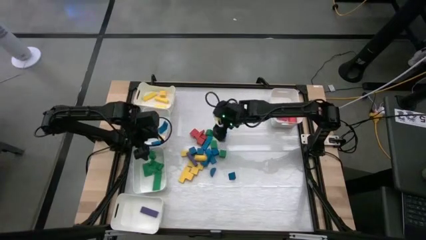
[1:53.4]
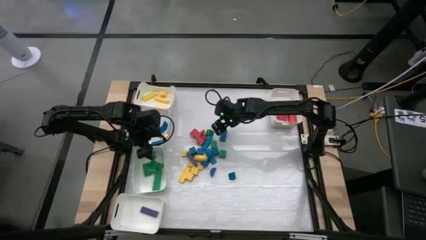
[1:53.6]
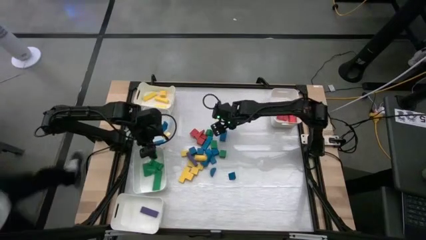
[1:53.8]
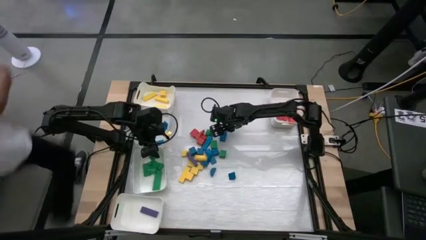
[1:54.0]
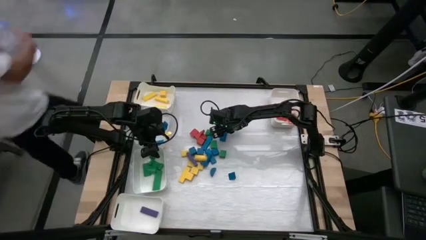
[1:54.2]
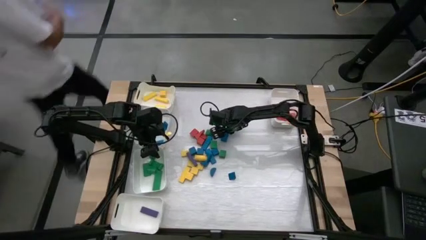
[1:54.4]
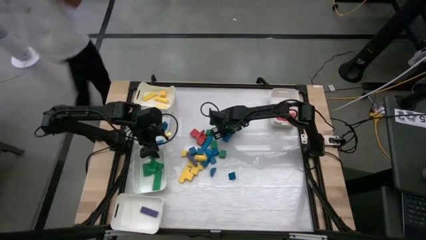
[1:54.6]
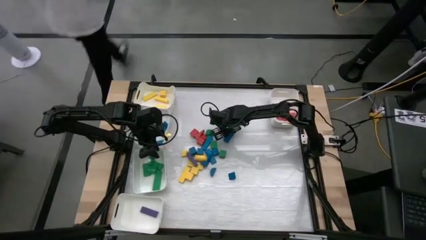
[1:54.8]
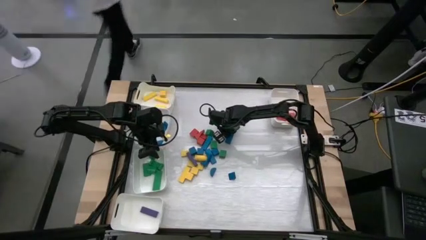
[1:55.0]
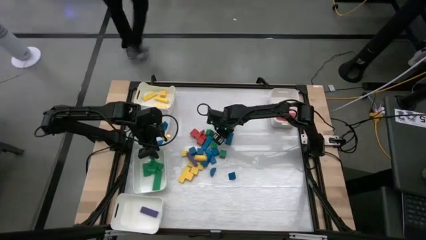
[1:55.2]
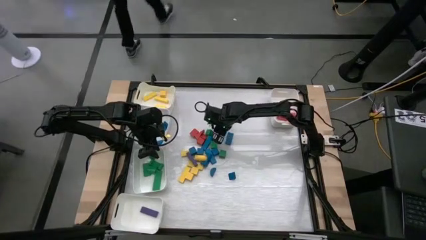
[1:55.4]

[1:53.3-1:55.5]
Task: Sort blocks
Put the blue wooden block into the top middle left white bin

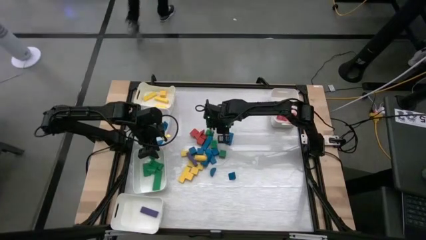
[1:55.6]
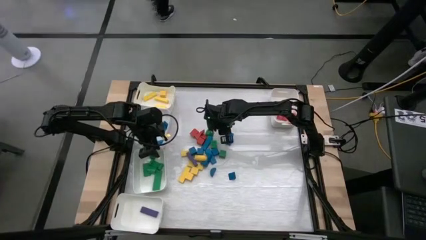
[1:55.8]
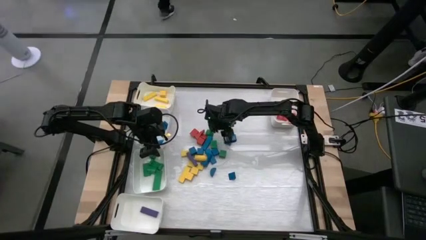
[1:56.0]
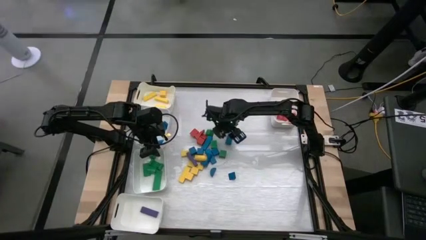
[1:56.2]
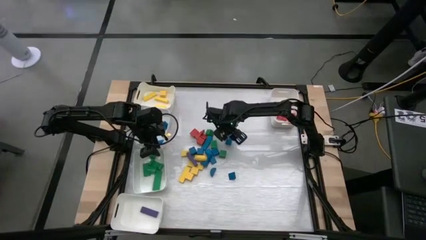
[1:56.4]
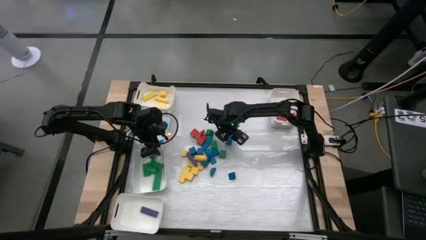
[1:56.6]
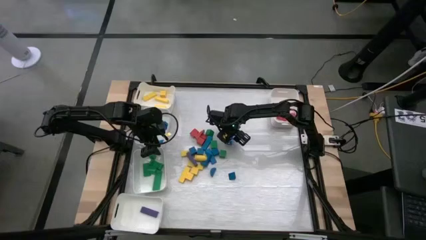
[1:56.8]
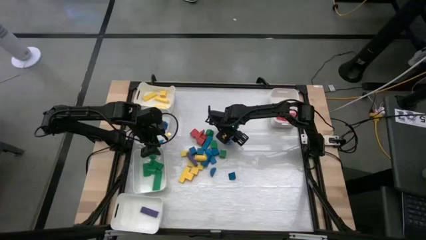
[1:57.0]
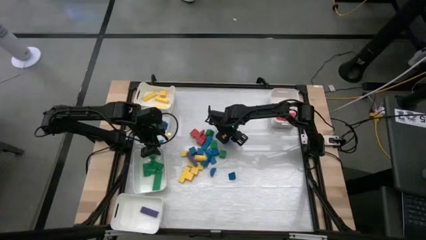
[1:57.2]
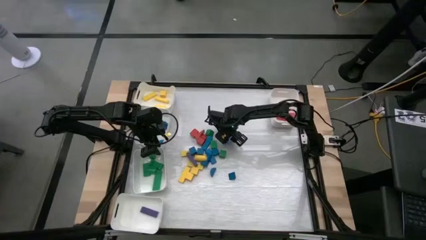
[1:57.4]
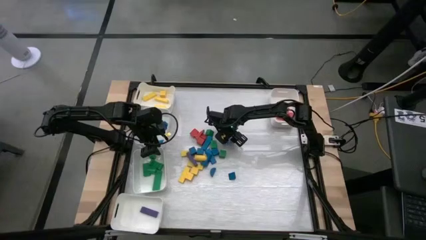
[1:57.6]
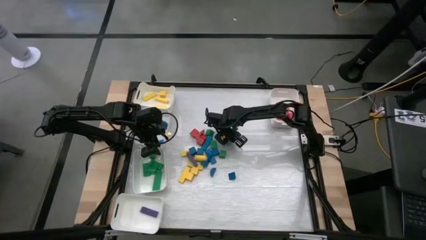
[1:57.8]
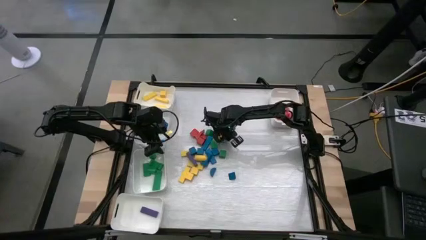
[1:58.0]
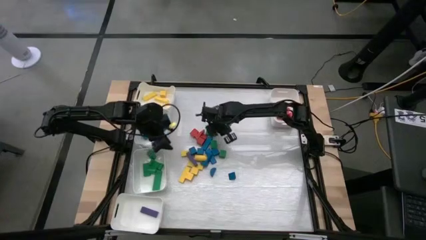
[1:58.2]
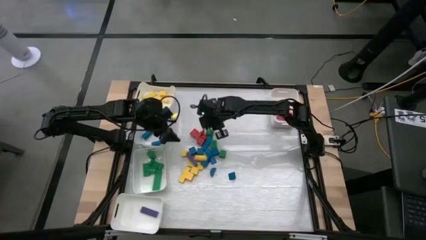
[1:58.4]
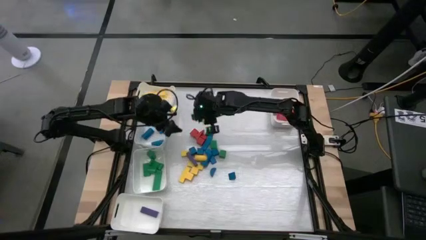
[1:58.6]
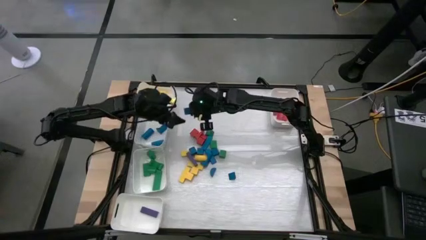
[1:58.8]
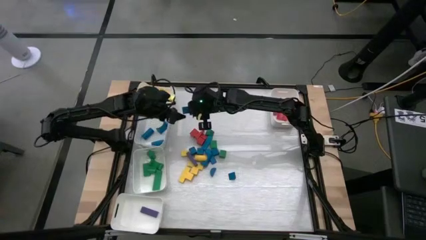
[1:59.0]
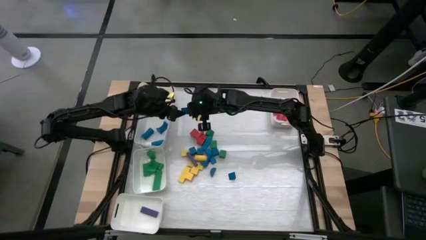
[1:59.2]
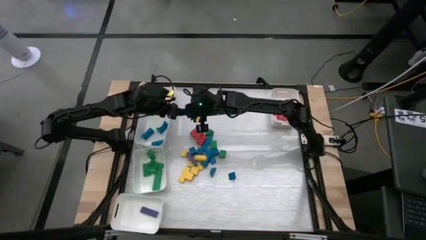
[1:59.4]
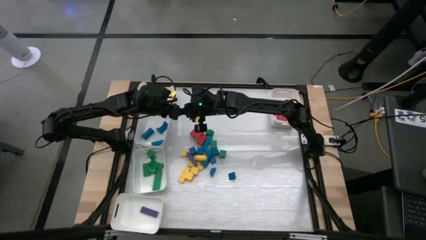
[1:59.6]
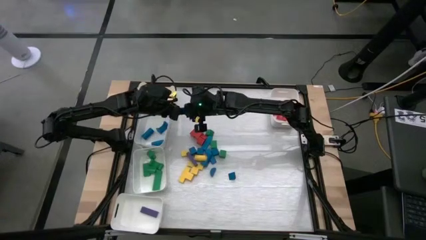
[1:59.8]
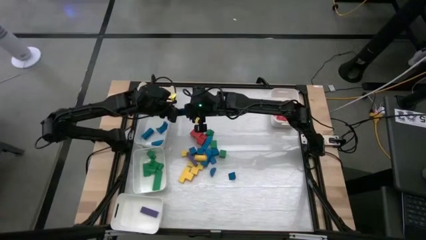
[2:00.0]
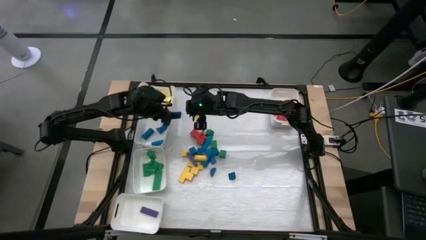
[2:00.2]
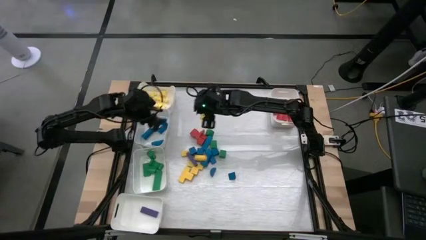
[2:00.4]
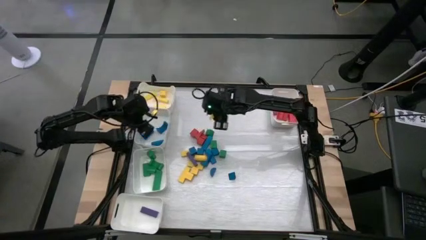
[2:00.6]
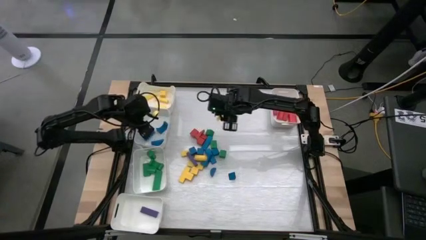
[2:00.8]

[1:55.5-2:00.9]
Put the blue wooden block into the top middle left white bin

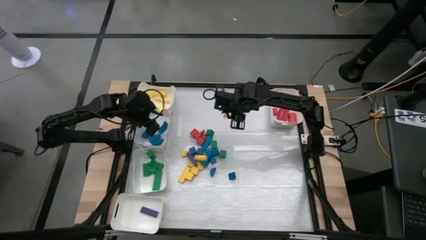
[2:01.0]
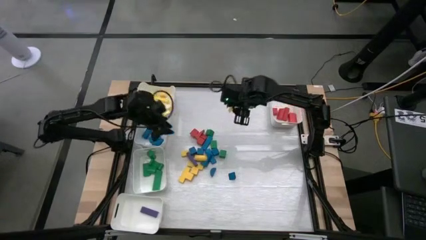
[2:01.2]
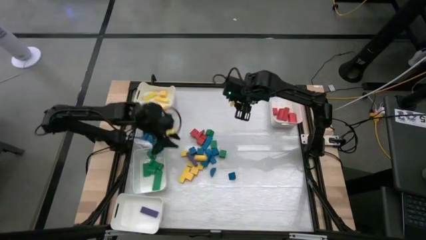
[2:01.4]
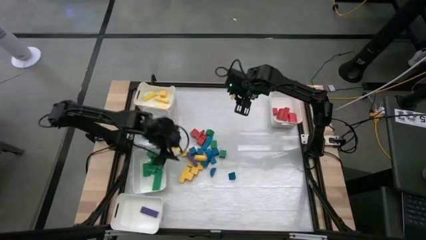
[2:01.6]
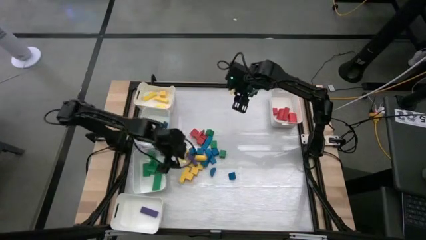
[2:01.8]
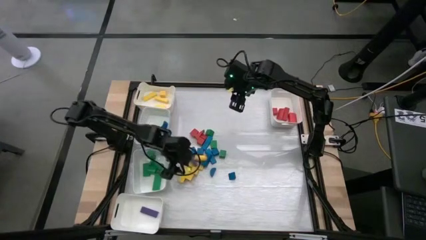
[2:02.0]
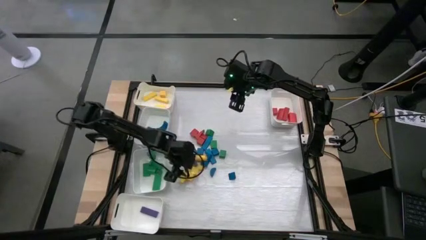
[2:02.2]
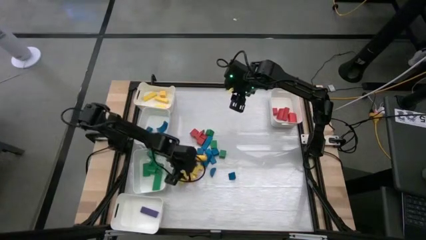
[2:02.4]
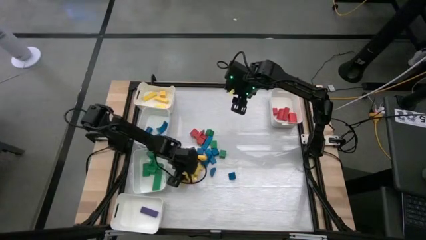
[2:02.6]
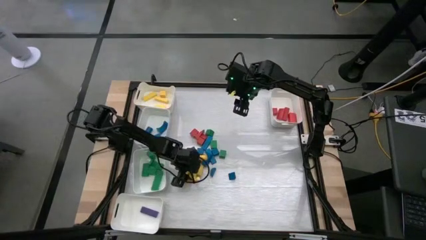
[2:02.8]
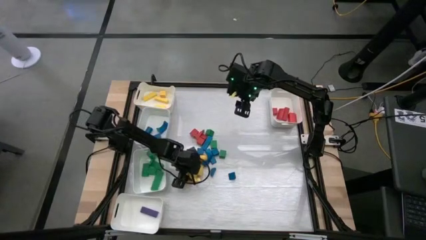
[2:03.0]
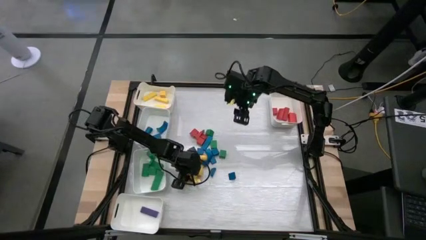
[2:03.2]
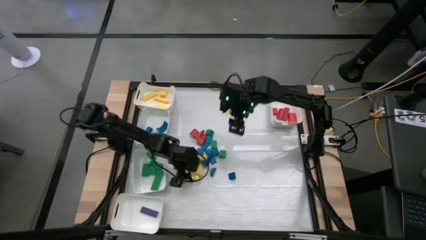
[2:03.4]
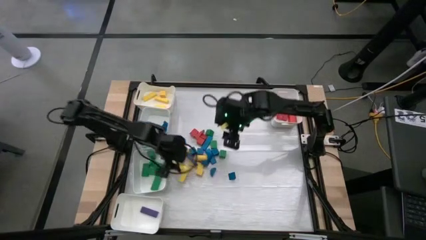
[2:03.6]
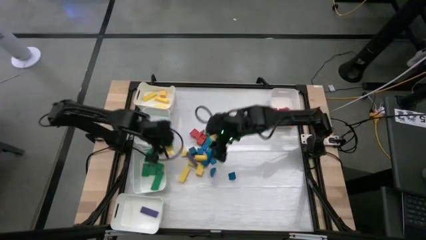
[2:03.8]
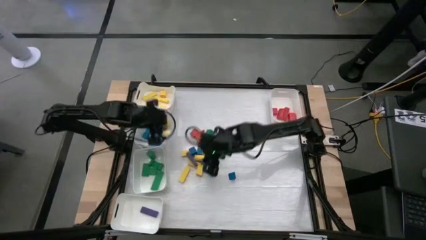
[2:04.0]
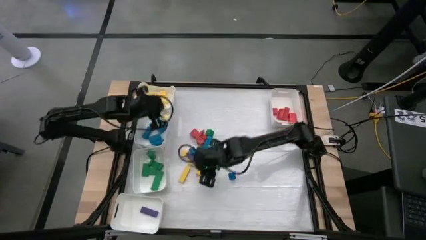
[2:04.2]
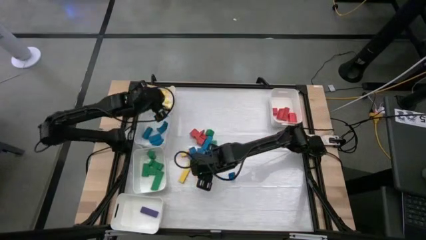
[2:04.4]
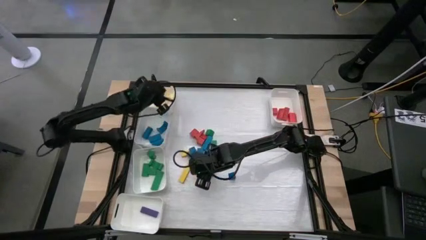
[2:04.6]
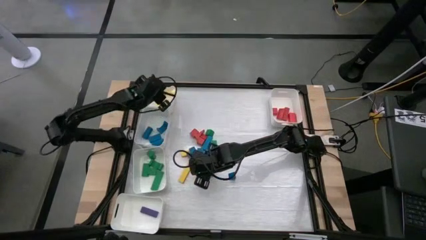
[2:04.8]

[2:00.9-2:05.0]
Put the yellow wooden block into the top left white bin

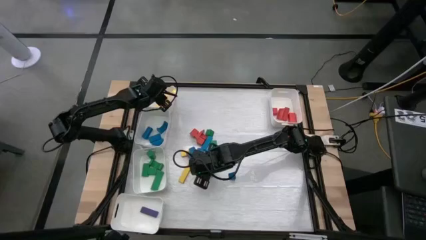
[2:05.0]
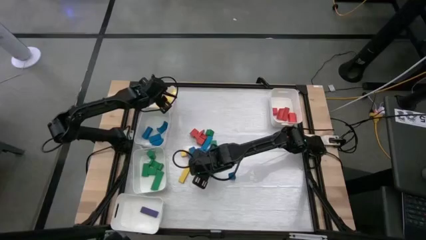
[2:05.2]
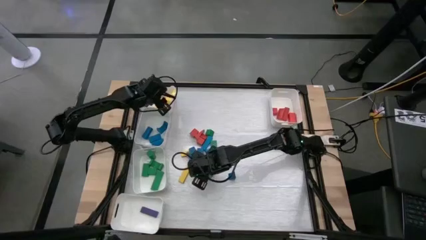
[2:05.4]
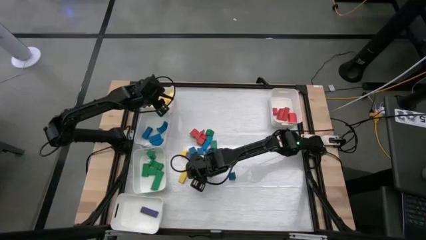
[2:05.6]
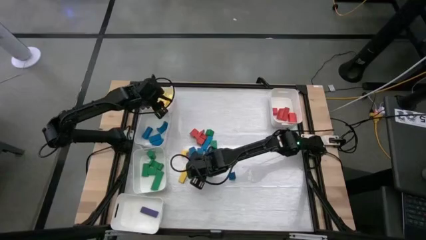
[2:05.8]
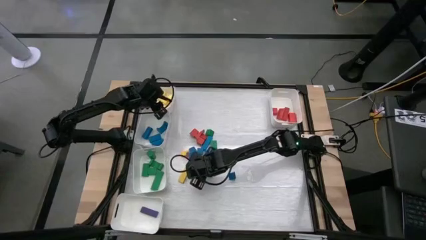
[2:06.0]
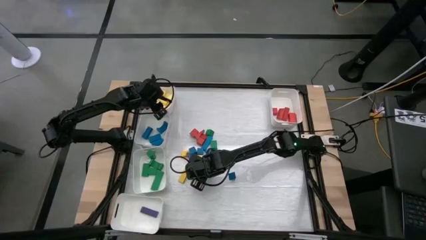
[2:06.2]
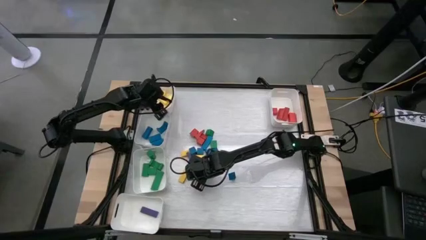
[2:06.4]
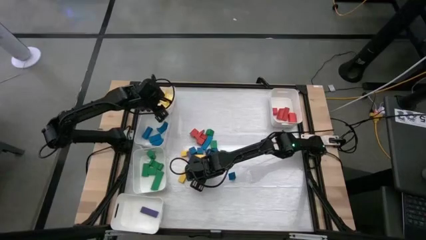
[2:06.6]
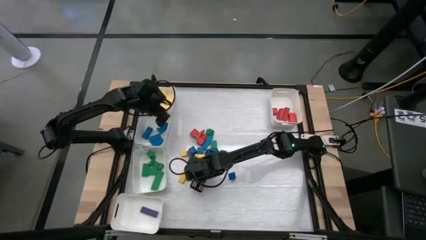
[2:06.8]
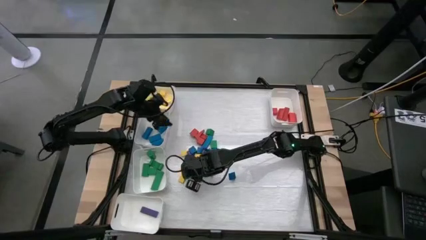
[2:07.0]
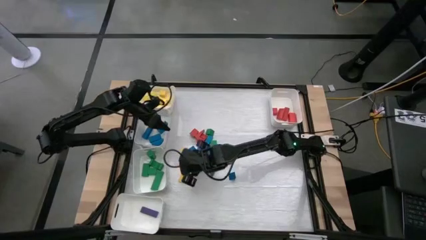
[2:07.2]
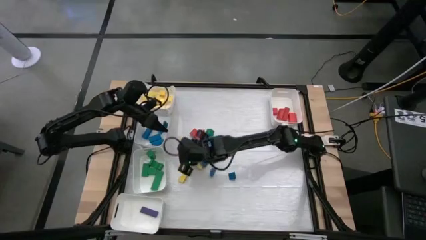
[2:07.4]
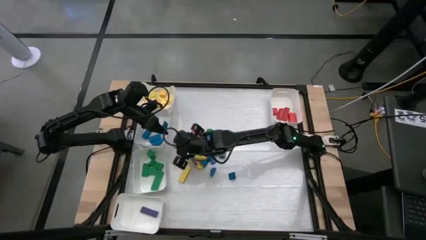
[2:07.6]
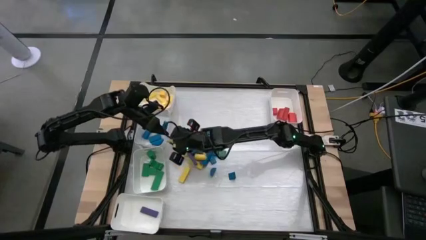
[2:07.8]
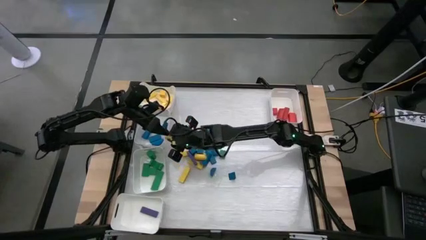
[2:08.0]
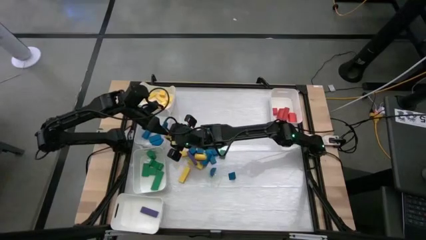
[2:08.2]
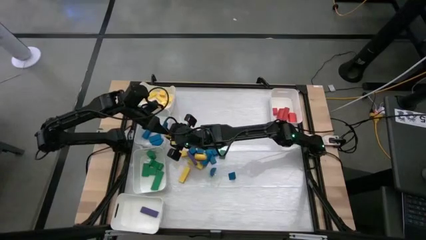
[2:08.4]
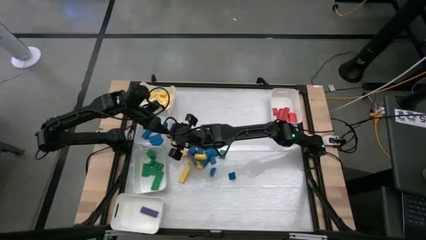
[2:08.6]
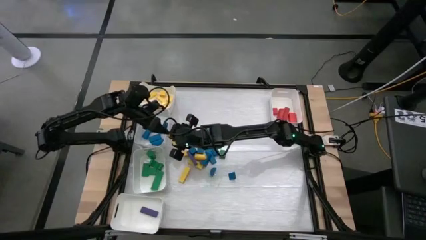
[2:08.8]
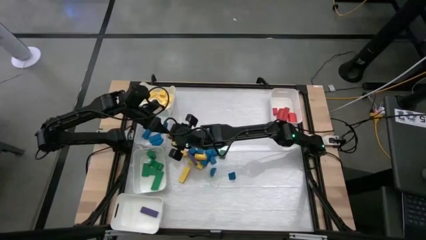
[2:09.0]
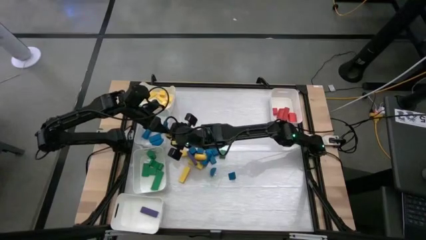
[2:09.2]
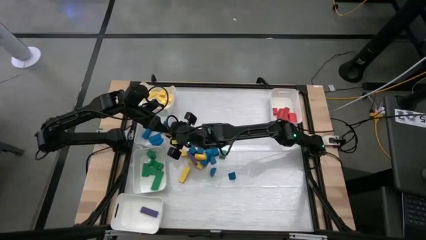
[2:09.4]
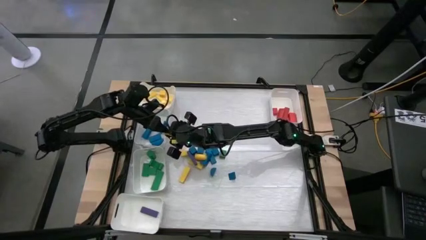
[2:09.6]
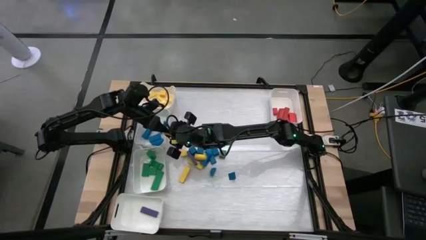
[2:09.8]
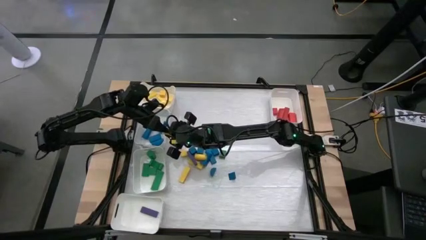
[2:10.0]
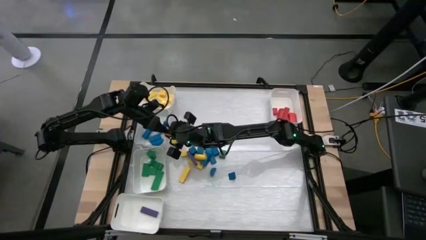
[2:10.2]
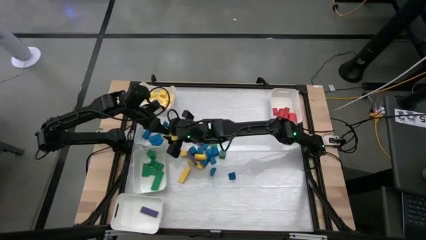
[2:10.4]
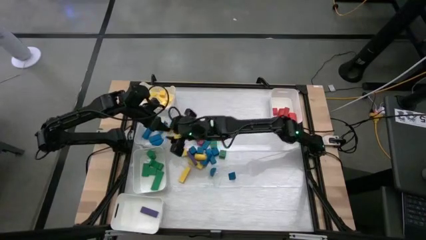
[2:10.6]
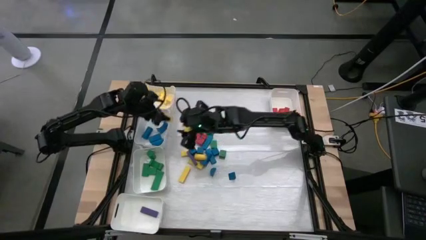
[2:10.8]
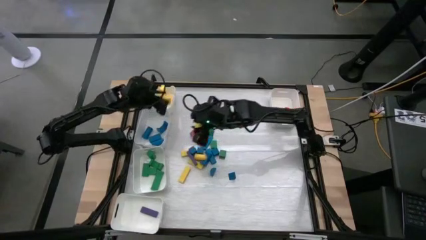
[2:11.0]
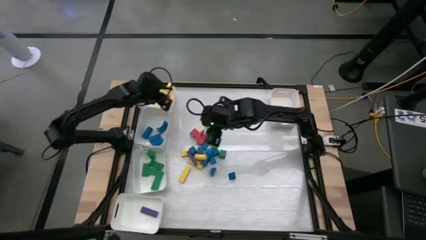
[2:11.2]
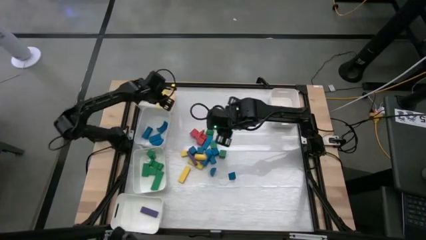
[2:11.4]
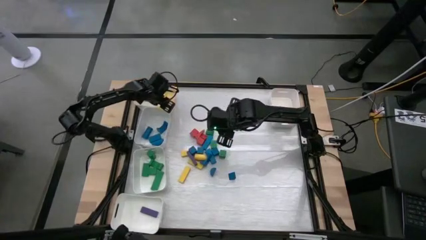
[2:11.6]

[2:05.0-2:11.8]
Put the yellow wooden block into the top left white bin
